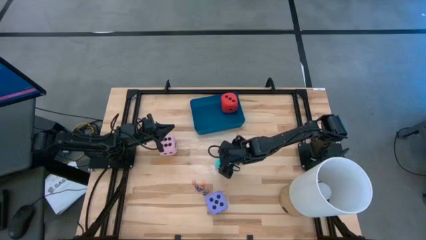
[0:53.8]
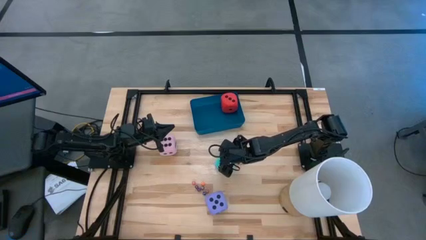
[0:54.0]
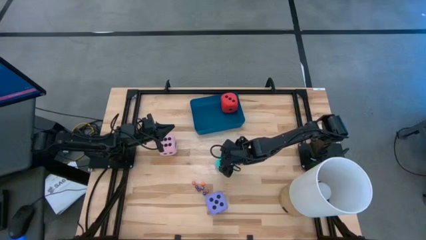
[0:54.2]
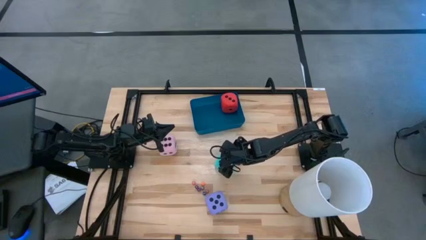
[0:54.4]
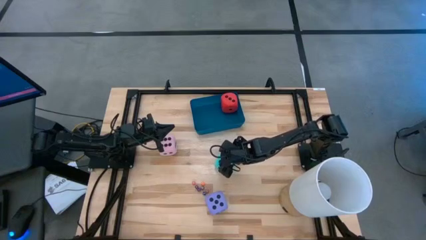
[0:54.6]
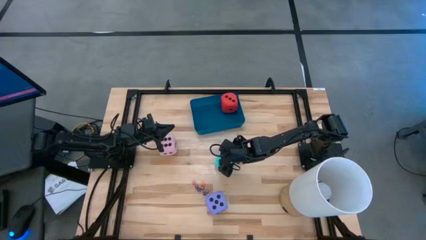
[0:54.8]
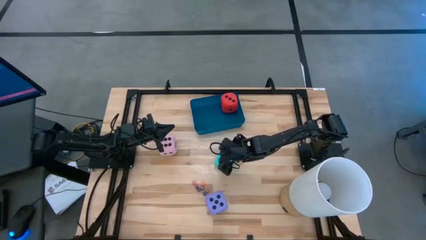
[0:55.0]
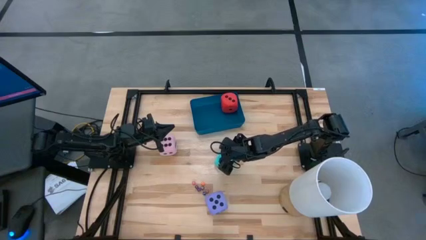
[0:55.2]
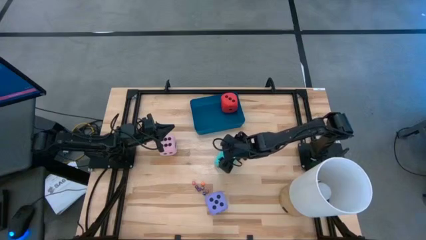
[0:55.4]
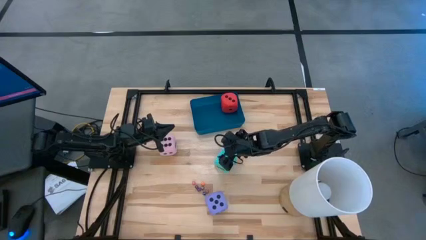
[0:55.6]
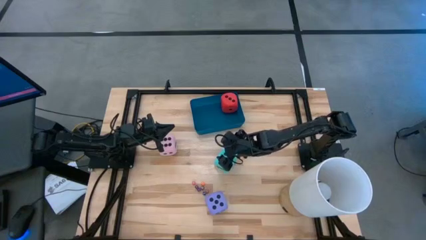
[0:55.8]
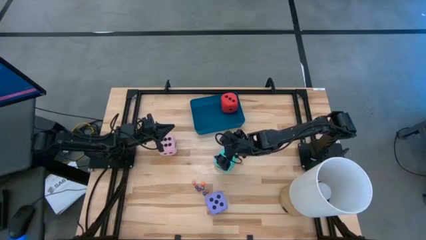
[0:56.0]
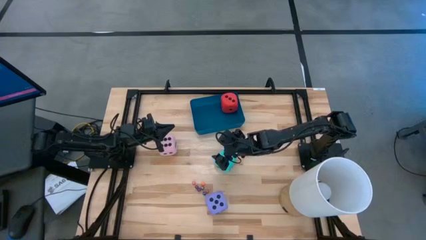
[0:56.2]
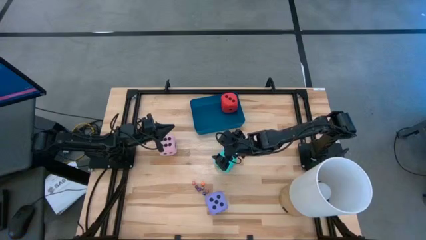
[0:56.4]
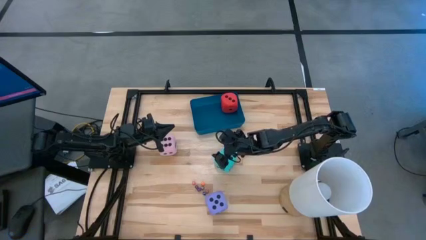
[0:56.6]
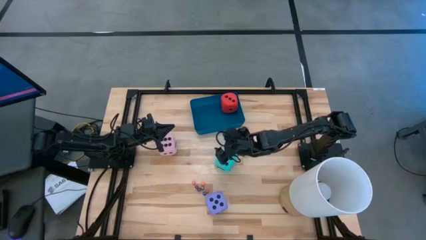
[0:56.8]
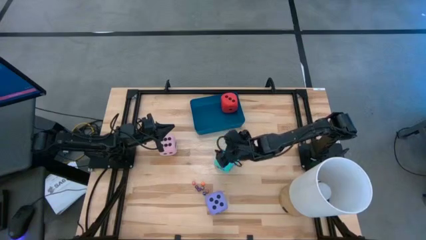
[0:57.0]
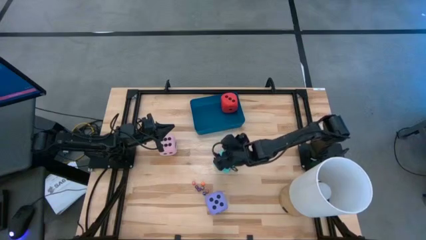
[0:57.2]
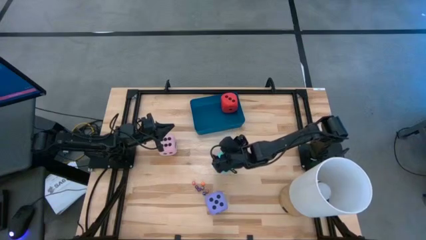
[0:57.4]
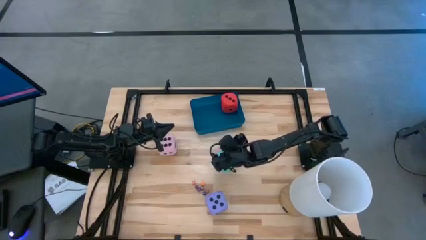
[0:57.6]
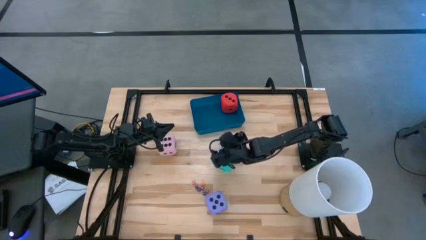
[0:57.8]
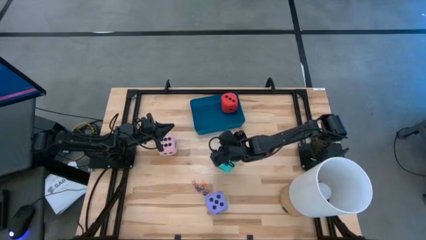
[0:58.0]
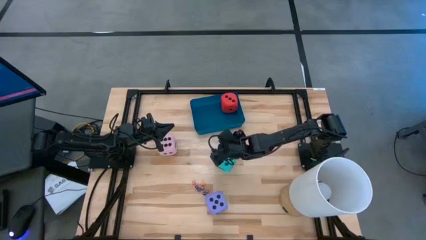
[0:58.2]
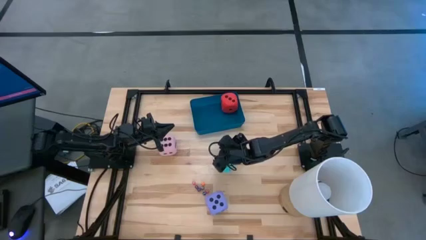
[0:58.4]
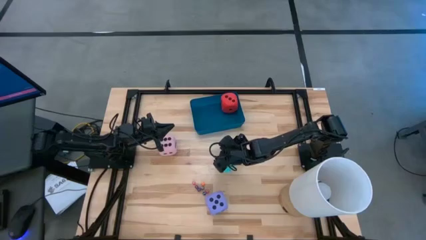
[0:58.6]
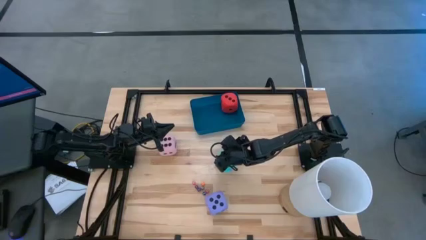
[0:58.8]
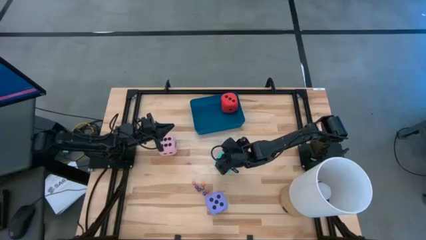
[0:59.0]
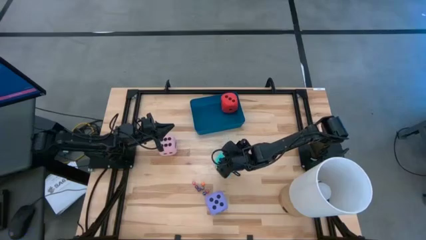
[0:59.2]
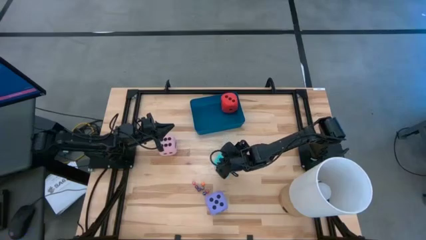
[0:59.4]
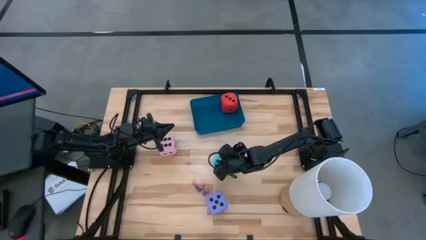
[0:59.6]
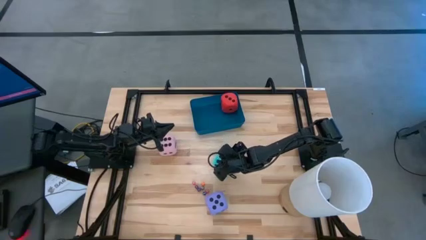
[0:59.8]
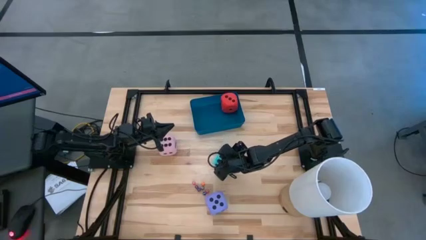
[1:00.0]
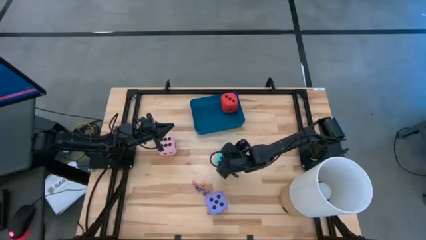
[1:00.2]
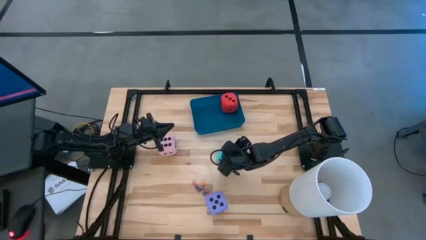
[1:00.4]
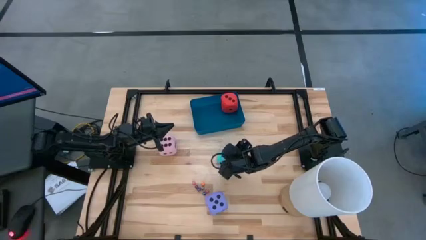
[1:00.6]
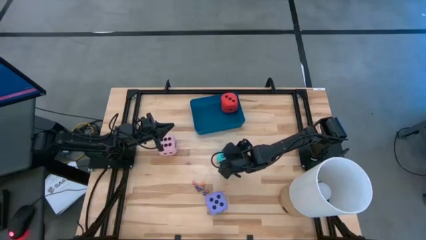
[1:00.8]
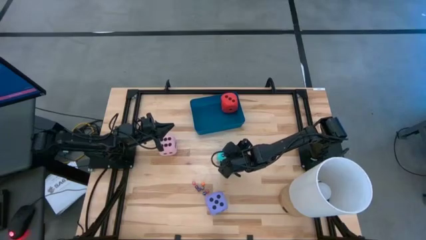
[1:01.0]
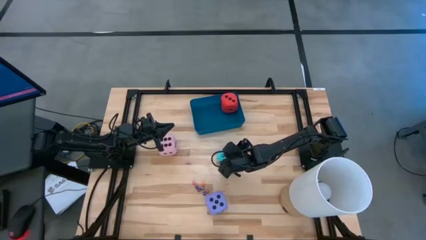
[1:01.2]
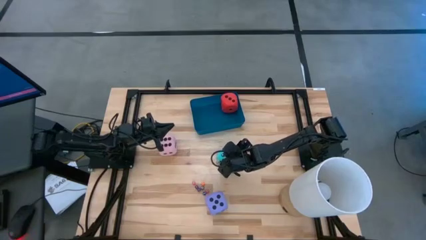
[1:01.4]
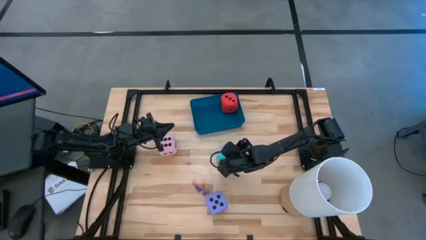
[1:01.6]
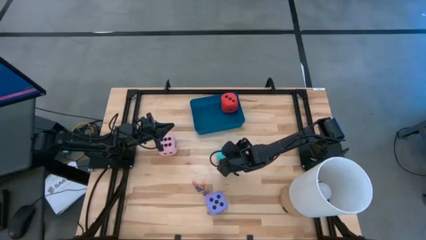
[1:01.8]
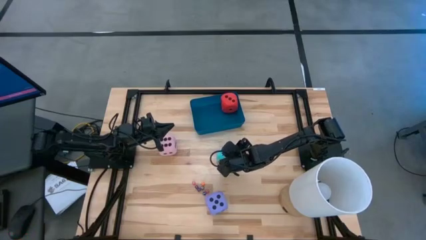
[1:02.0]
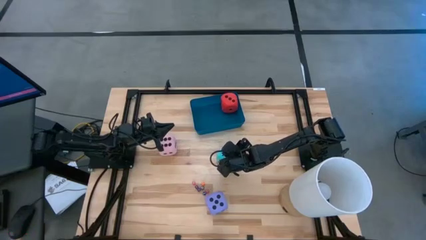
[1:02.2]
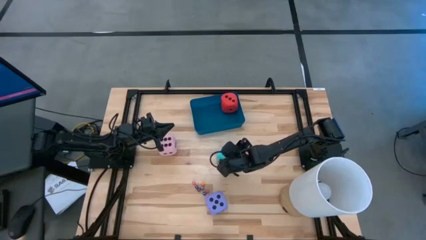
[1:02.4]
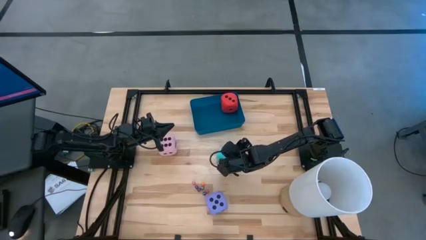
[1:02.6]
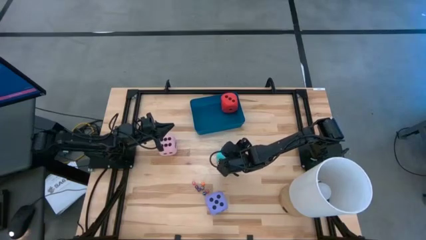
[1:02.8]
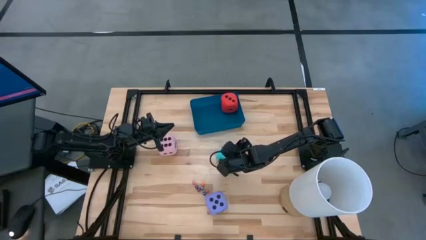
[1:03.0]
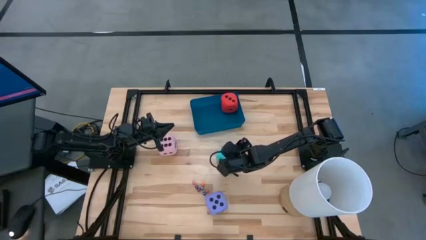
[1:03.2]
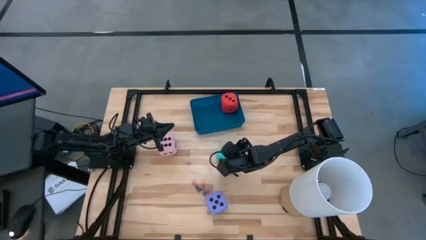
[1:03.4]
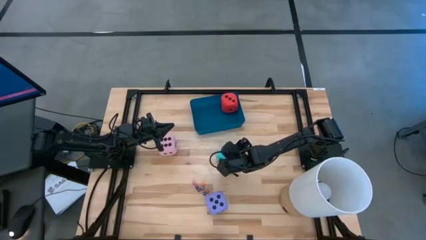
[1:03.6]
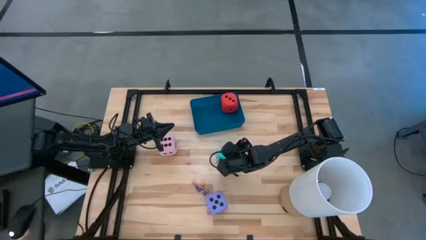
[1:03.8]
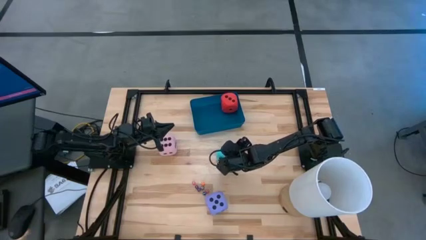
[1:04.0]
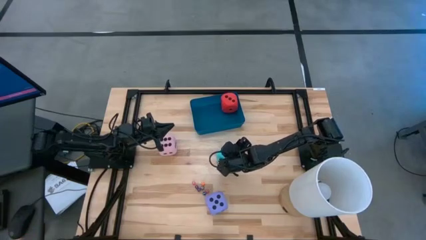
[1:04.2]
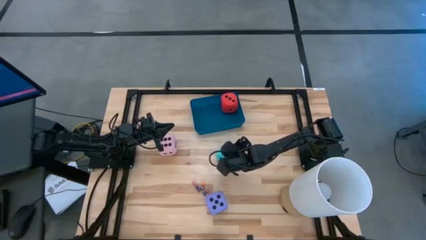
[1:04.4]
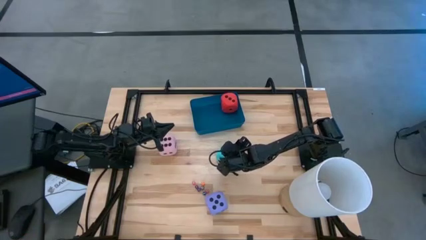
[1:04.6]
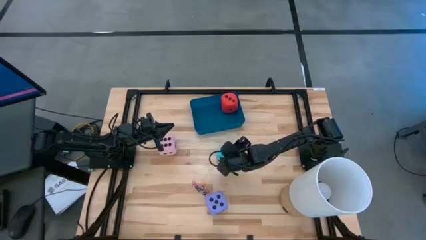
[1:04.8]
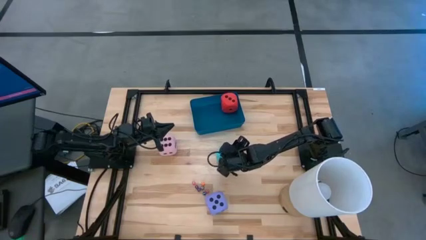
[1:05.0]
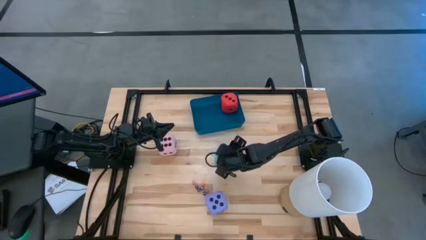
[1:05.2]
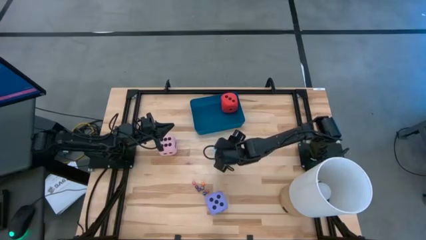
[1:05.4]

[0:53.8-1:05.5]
Task: Pick & Place Dice
Put the large blue dice into the blue bin
